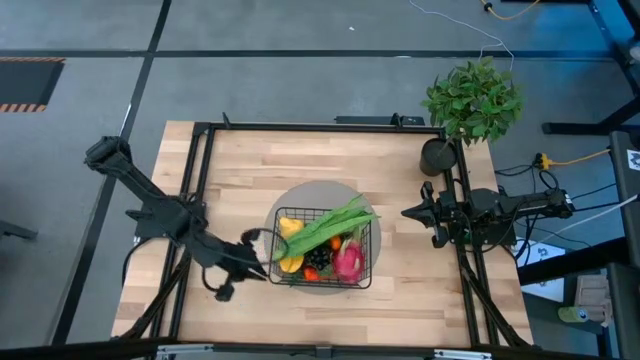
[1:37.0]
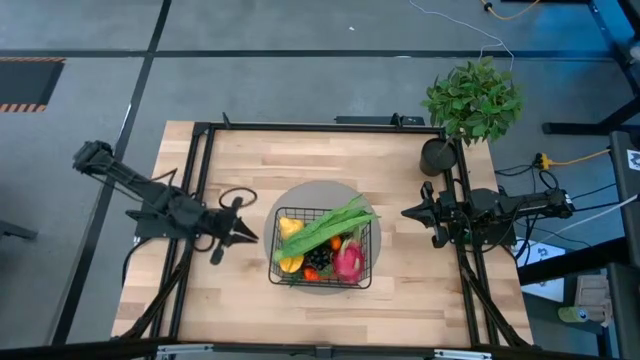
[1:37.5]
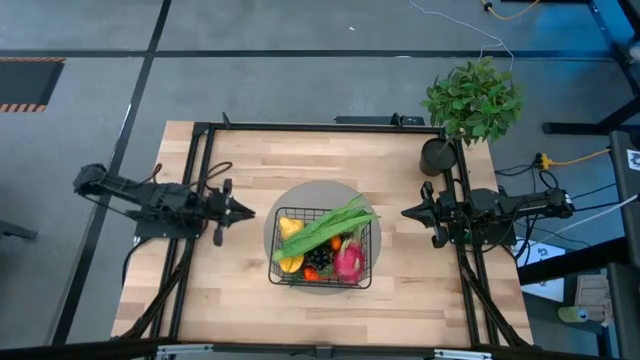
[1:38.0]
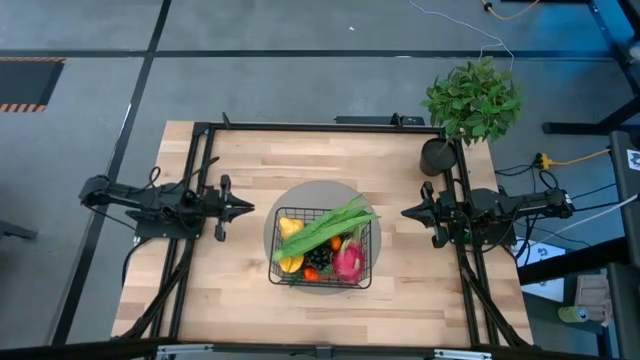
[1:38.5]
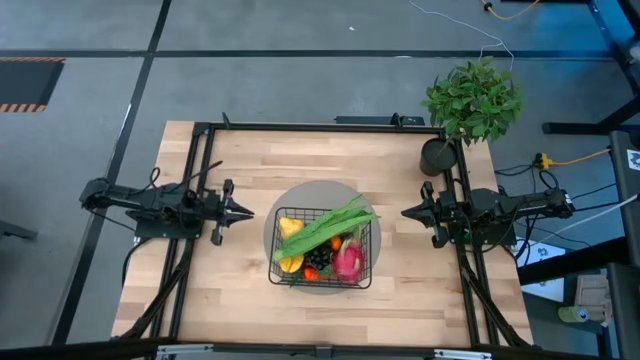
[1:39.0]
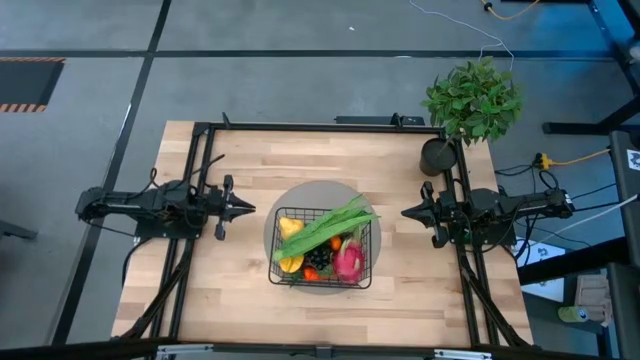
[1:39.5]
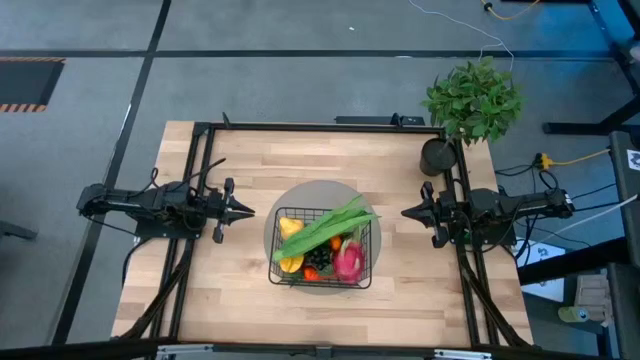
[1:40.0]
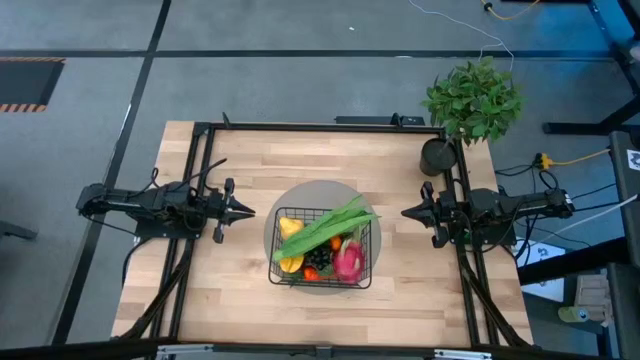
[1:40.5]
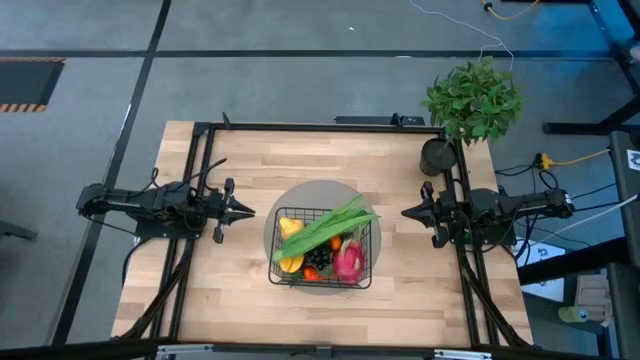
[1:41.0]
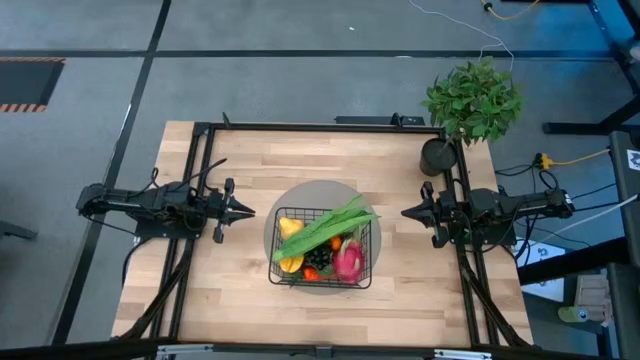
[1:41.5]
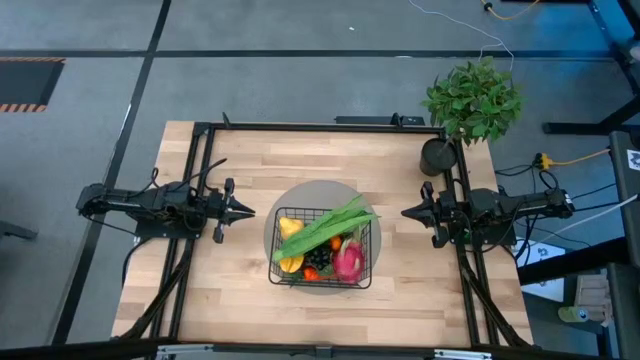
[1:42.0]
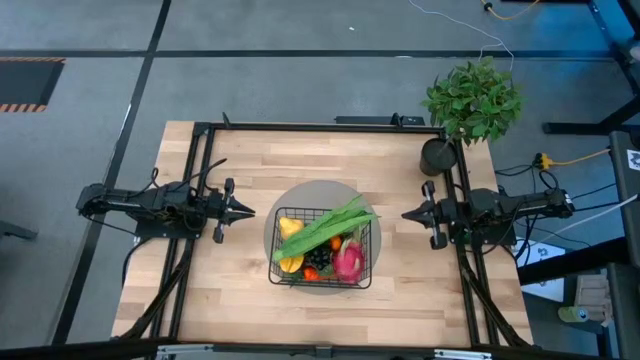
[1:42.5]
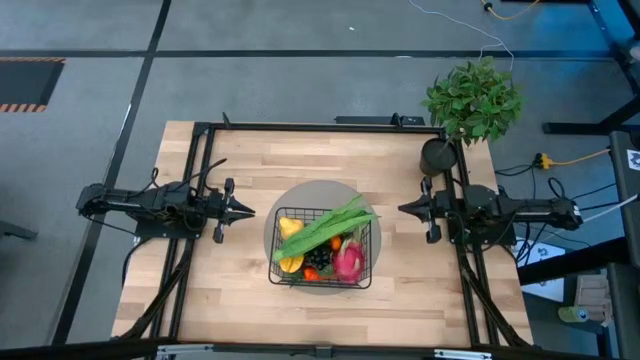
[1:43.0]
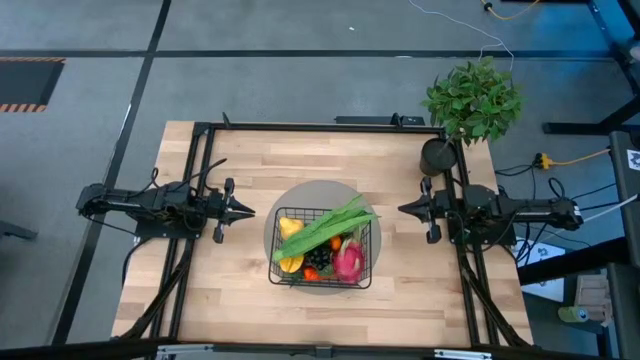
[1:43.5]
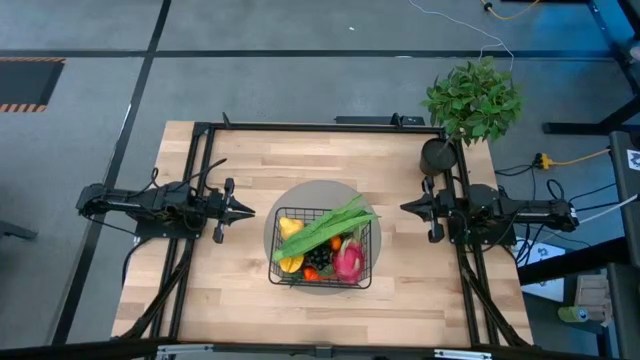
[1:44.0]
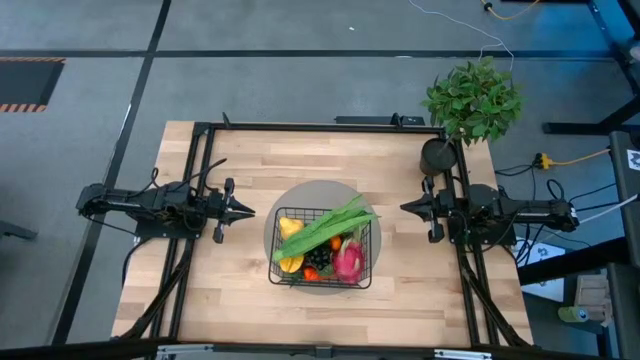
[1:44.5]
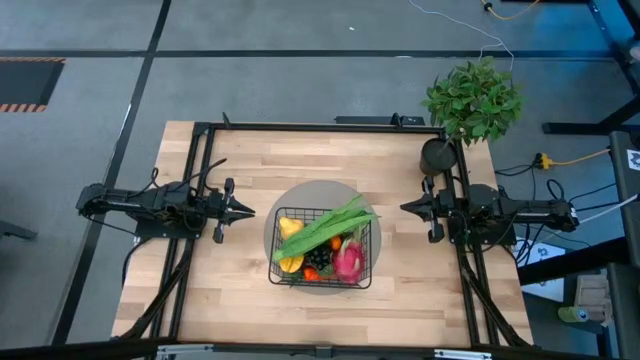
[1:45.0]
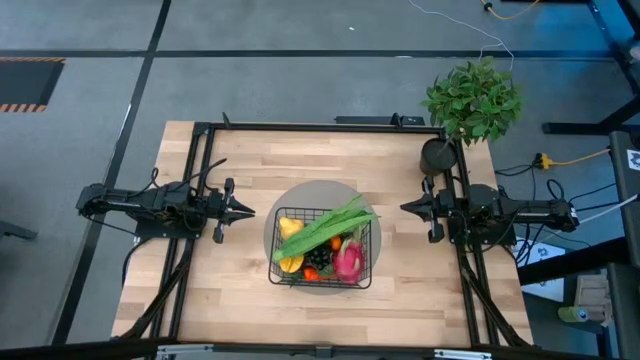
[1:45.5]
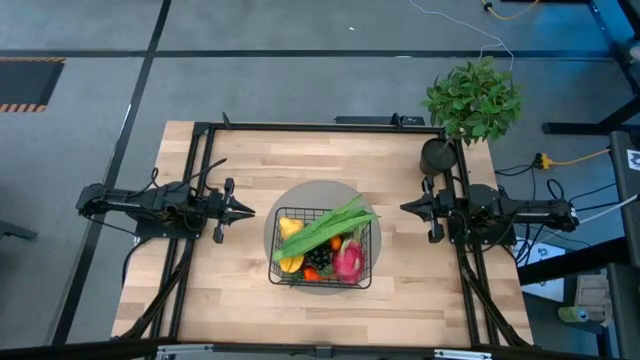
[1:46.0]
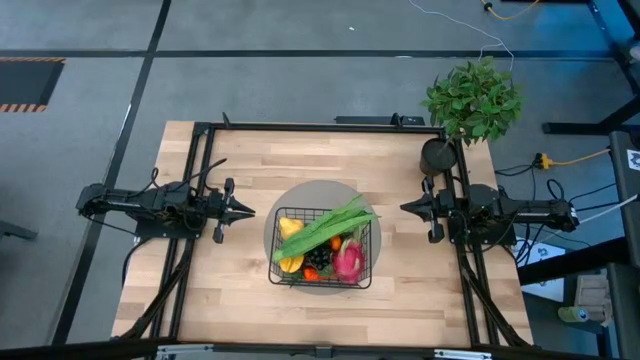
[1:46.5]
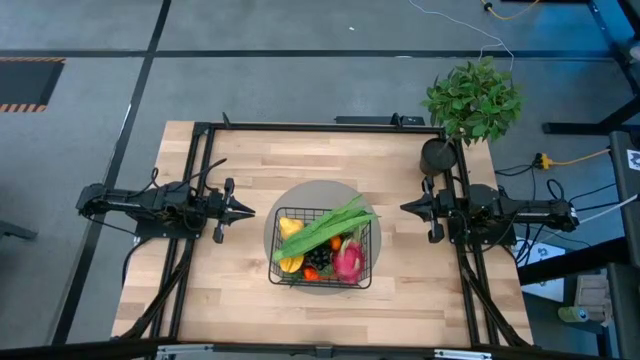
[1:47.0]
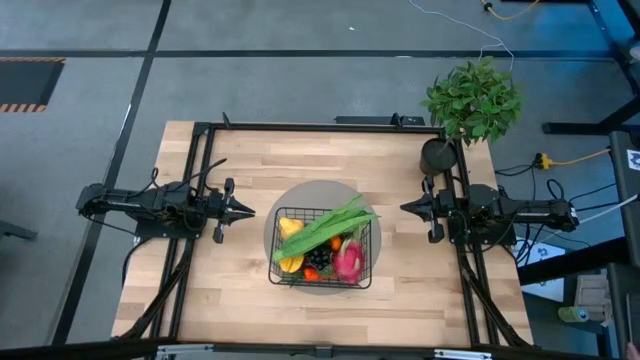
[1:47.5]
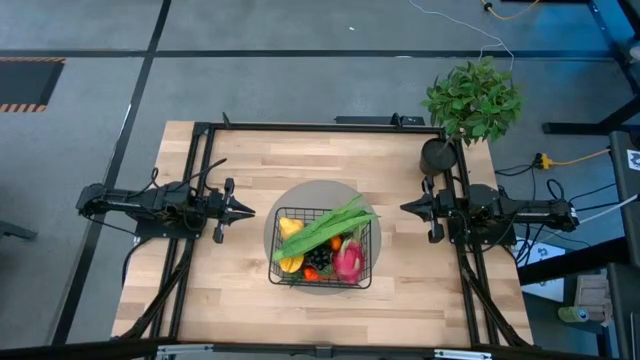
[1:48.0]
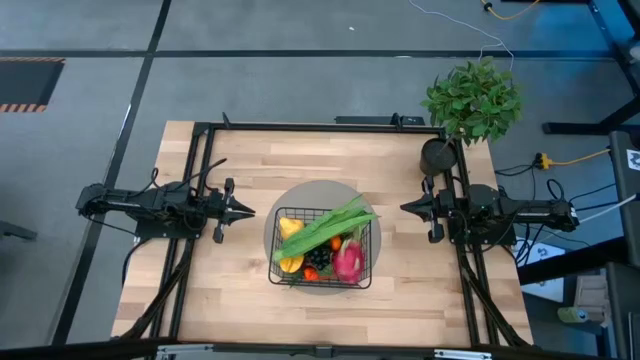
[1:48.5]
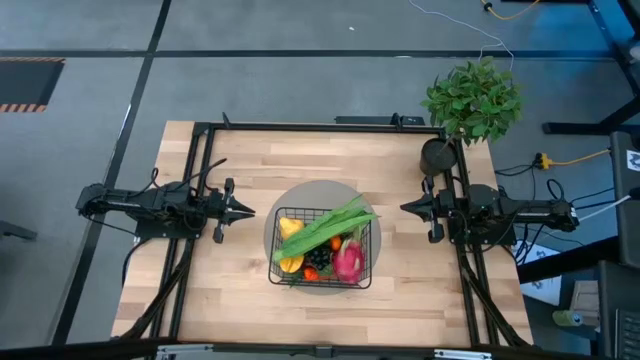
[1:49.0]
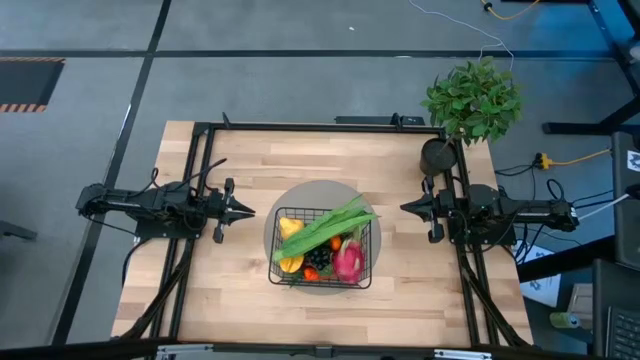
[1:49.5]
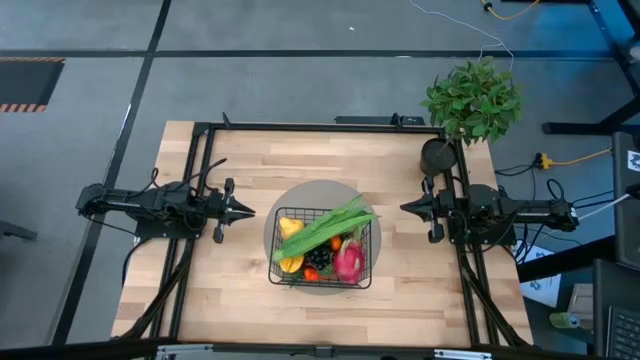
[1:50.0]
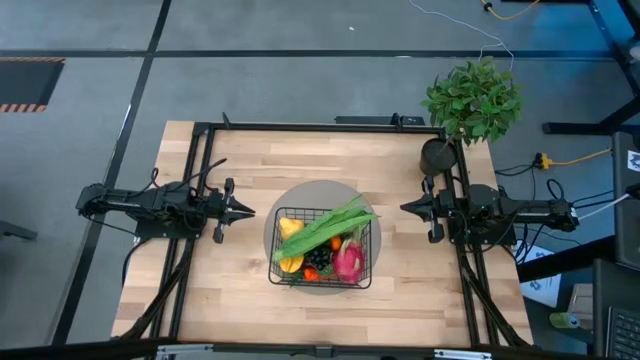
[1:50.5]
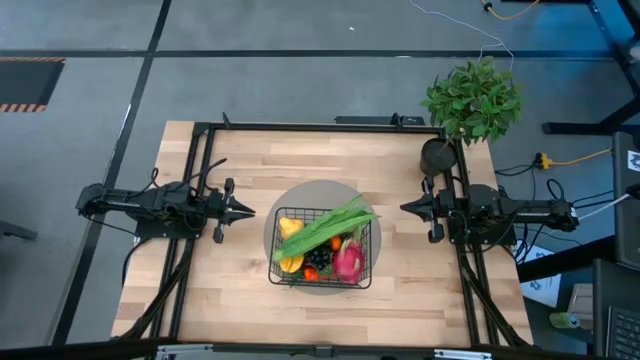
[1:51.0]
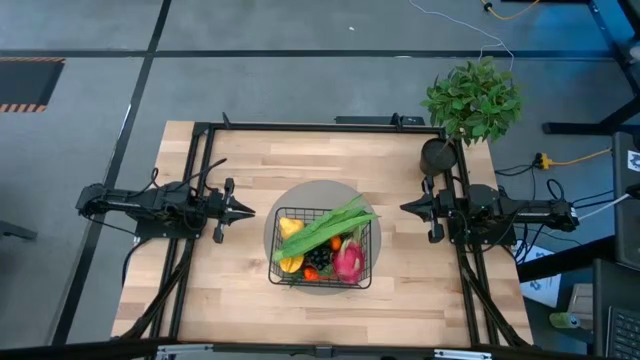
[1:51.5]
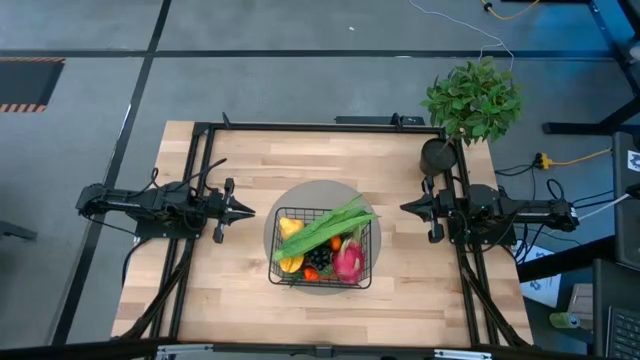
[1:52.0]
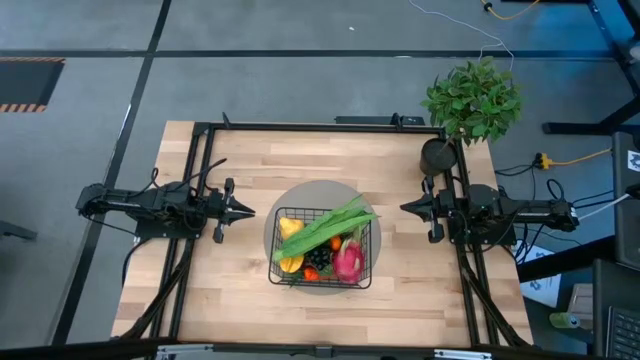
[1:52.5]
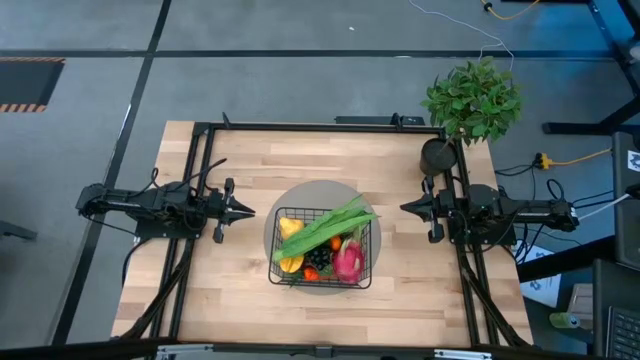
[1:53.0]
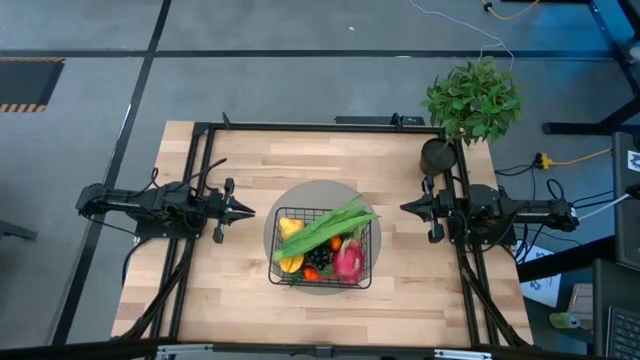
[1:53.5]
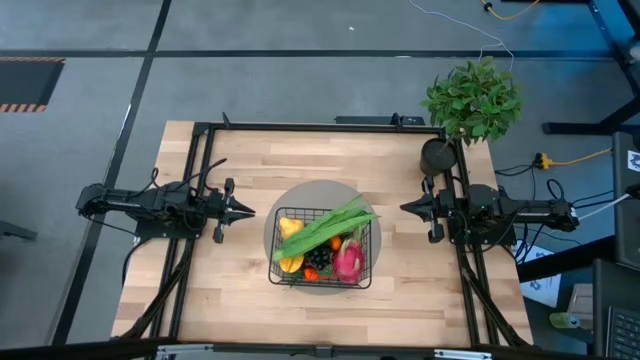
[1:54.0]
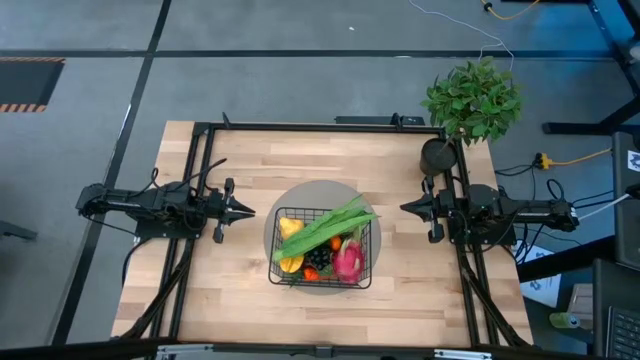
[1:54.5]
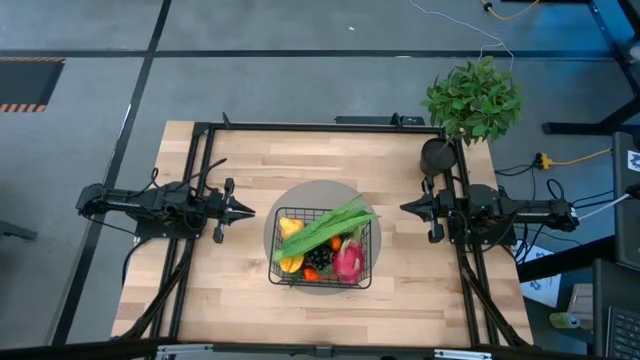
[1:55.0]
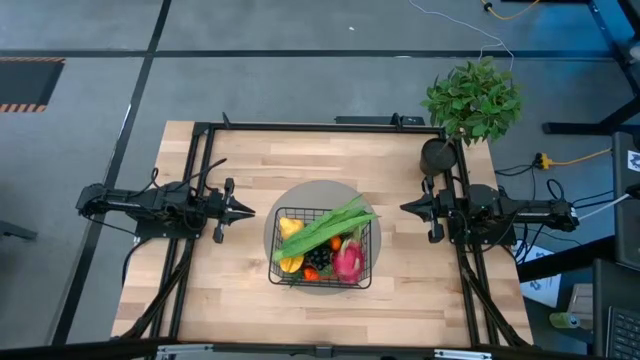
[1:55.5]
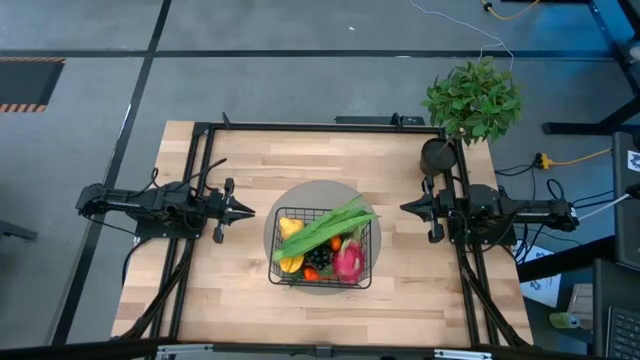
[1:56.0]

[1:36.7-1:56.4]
Task: Build produce basket
Return to Home Position

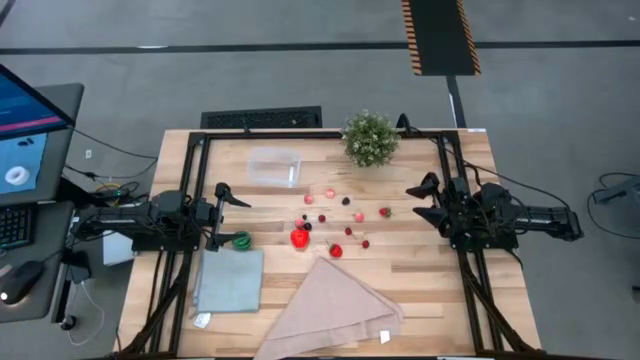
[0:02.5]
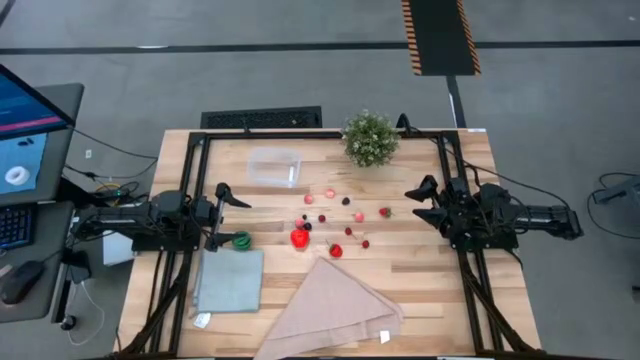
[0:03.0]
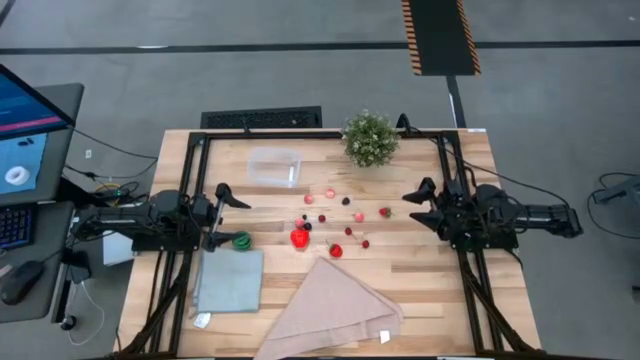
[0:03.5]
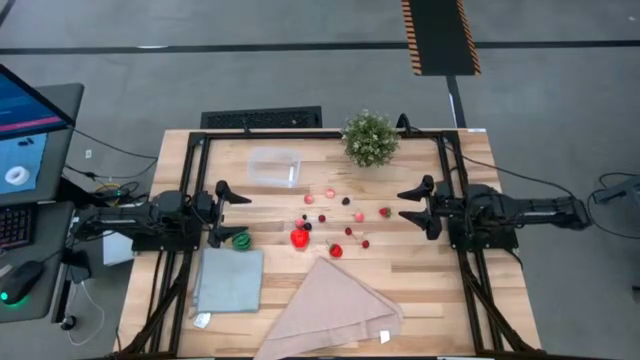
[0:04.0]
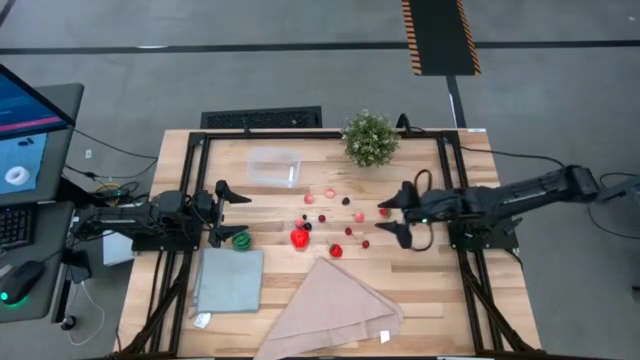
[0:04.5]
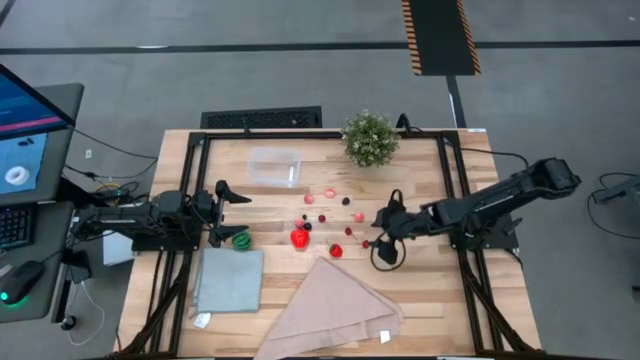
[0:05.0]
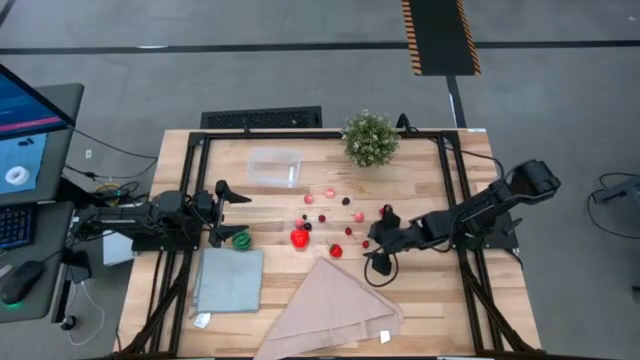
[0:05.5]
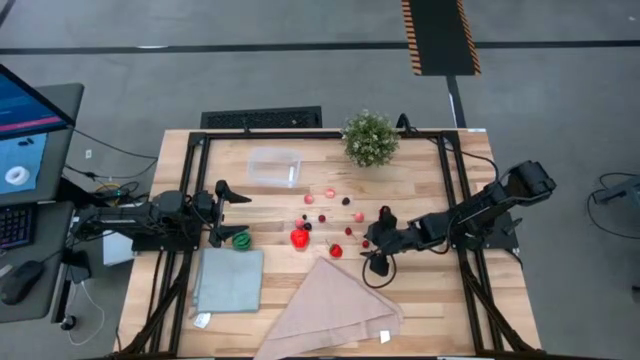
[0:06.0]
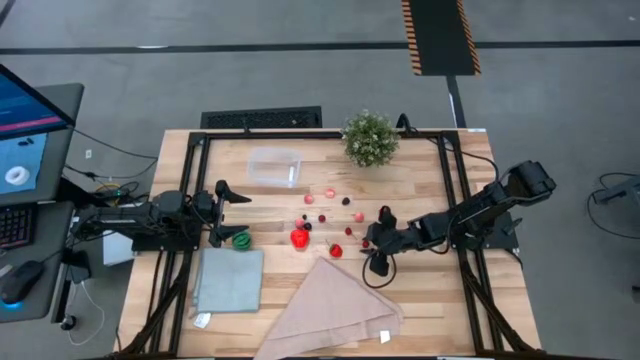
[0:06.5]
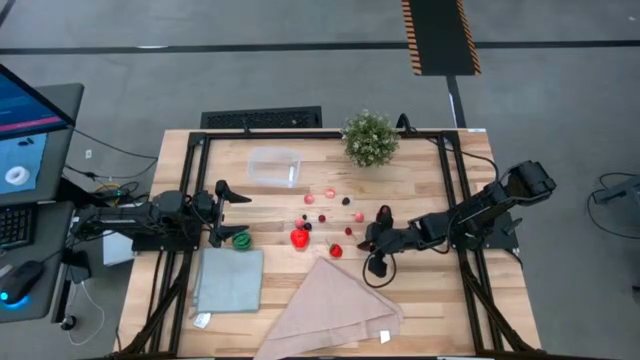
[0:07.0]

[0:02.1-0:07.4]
Task: Pick and placing Produce into tupperware
Put the red cherry into the transparent container
